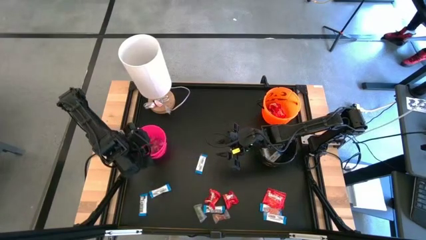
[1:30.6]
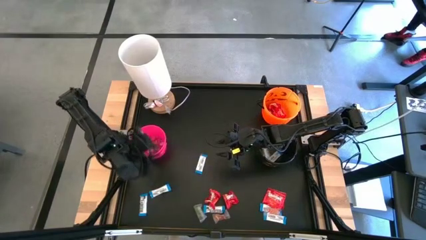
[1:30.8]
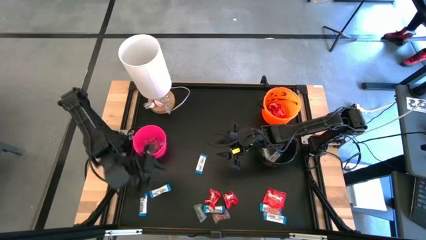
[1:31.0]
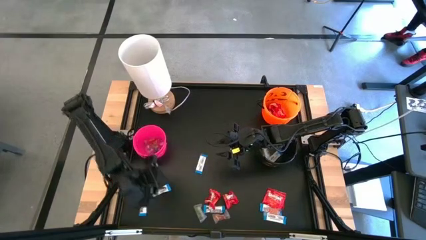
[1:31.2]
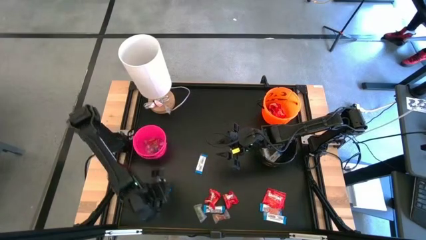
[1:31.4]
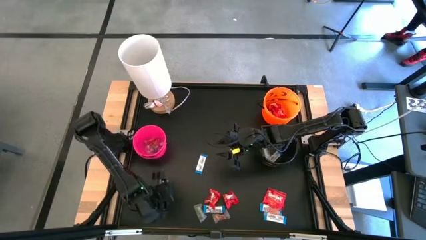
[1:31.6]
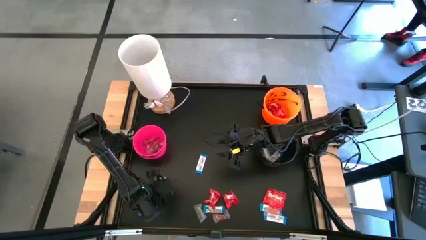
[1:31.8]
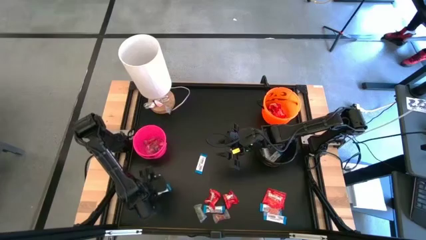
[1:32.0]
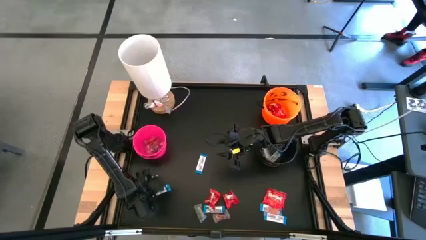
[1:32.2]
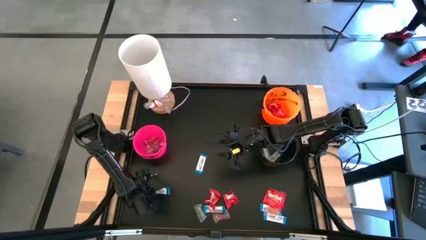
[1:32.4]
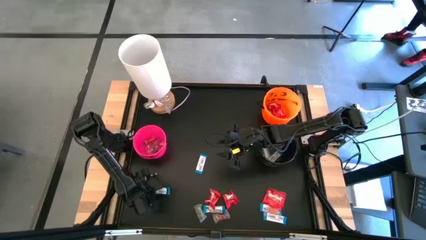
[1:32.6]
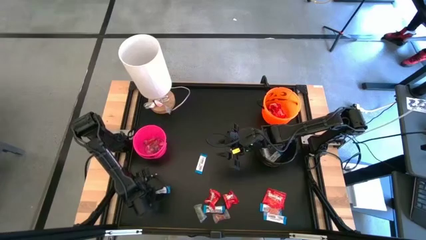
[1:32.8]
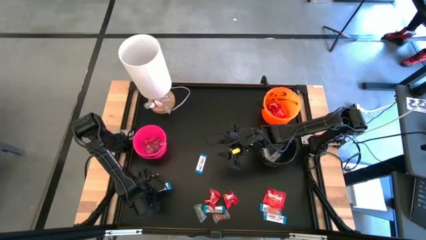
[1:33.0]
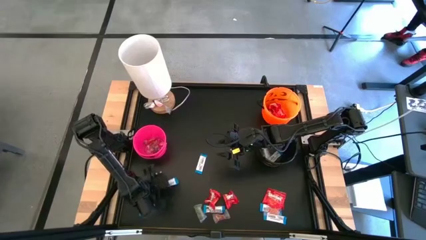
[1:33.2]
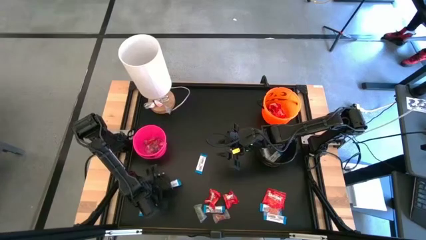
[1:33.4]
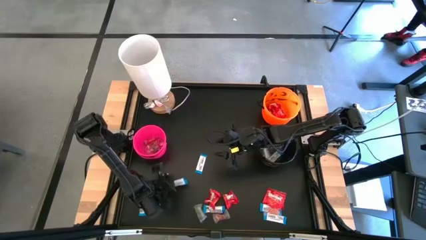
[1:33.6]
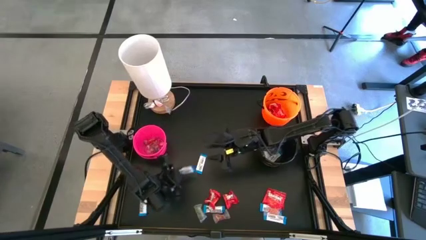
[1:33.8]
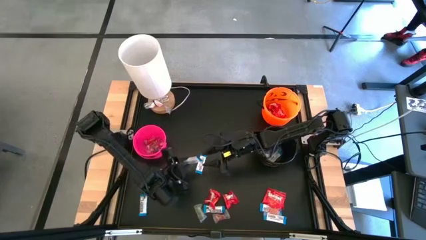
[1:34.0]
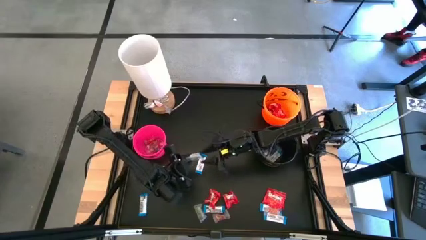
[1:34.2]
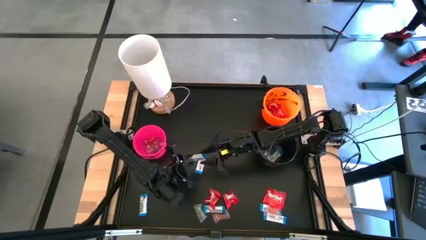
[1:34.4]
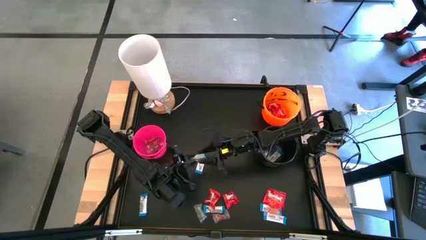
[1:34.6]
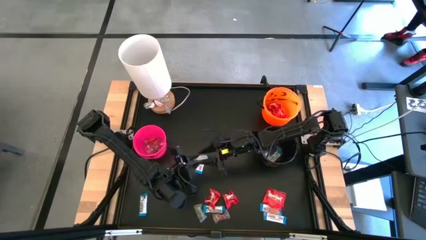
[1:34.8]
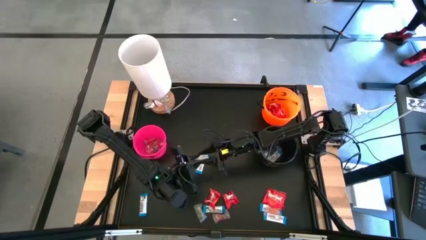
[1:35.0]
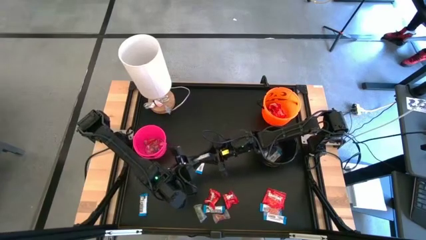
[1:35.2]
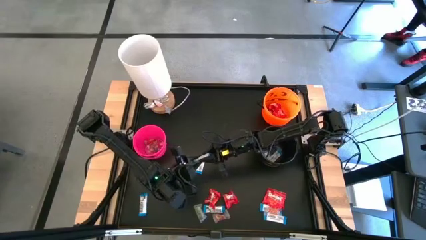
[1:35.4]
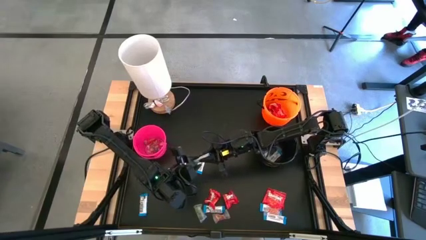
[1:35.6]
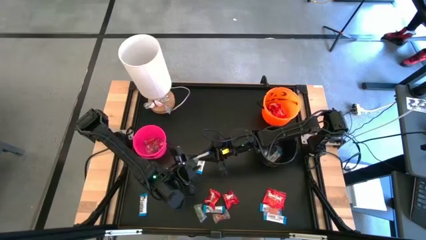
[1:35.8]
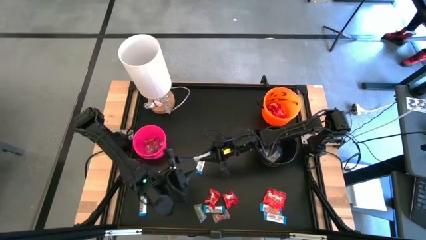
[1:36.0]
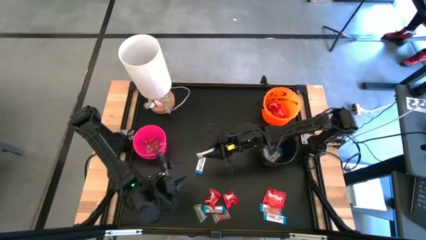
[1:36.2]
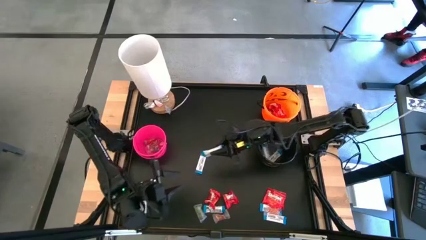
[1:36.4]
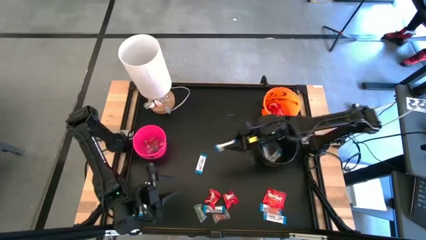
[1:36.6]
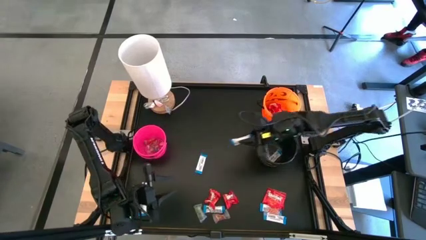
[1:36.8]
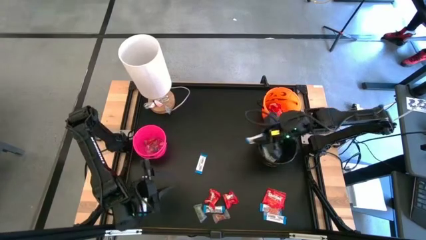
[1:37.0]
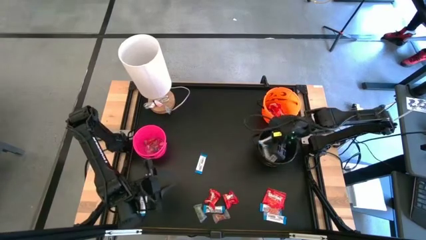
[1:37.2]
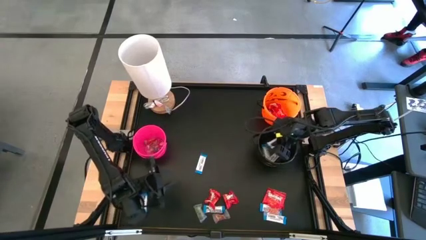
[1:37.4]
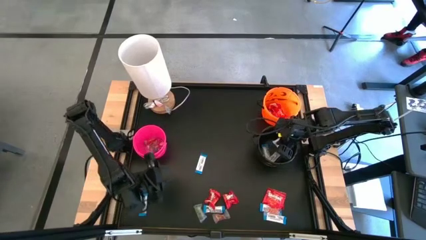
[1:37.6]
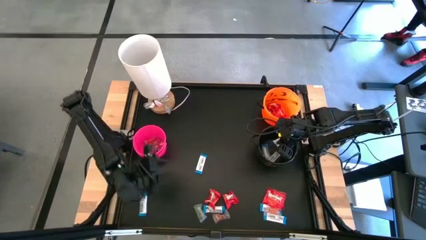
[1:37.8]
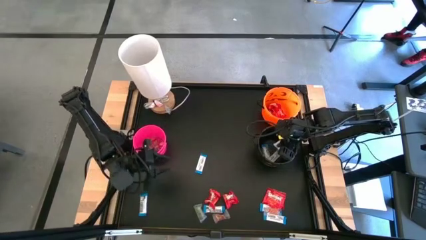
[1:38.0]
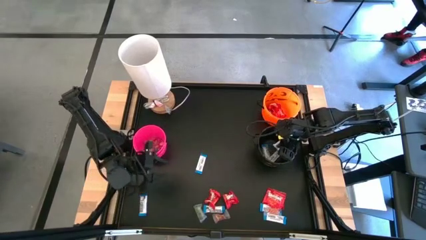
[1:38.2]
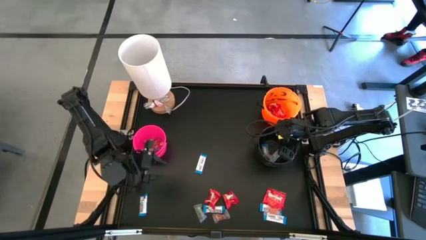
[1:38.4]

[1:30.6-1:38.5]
Task: Sort candy
Put the white chocolate into the black bucket

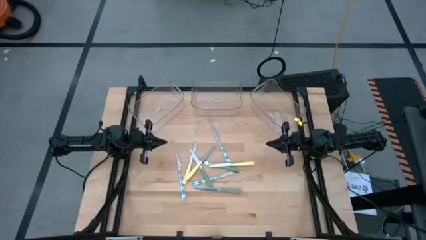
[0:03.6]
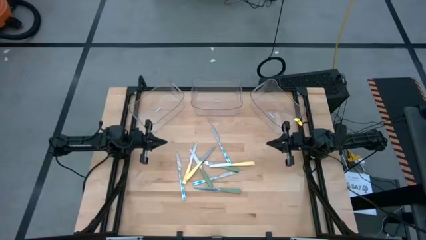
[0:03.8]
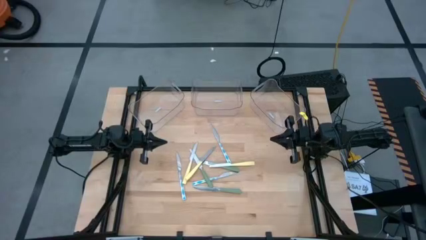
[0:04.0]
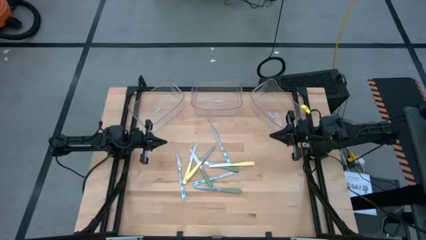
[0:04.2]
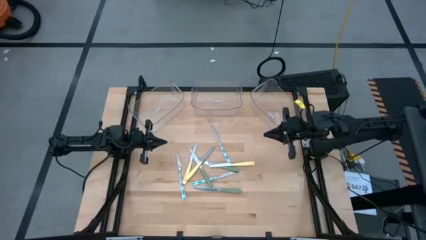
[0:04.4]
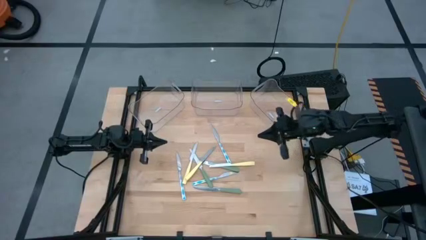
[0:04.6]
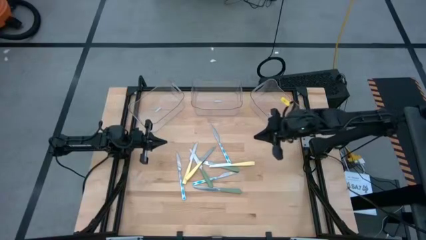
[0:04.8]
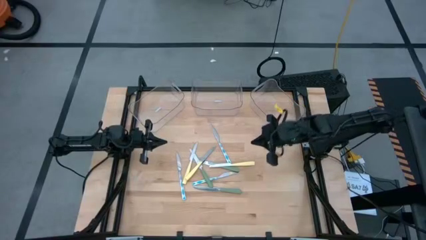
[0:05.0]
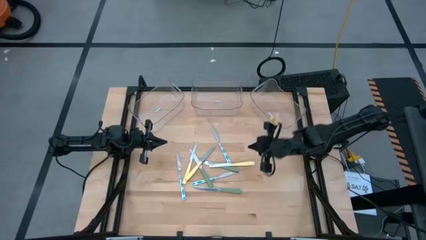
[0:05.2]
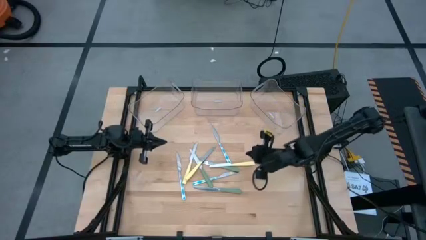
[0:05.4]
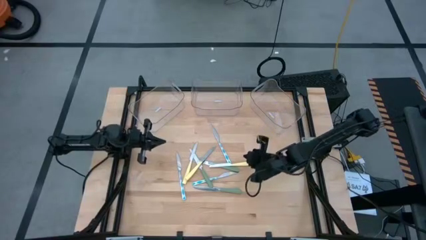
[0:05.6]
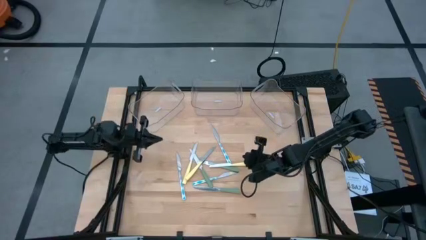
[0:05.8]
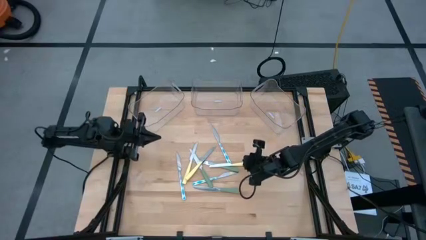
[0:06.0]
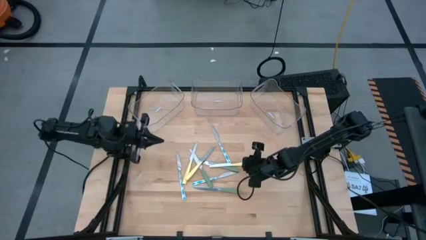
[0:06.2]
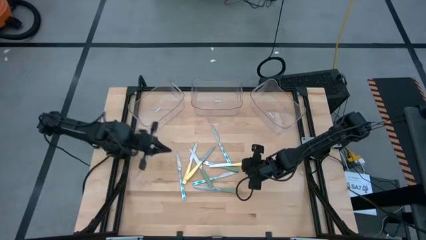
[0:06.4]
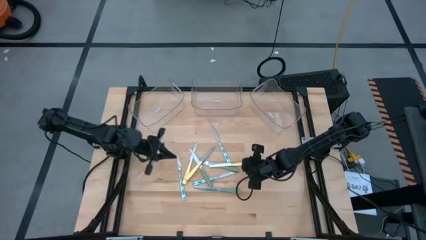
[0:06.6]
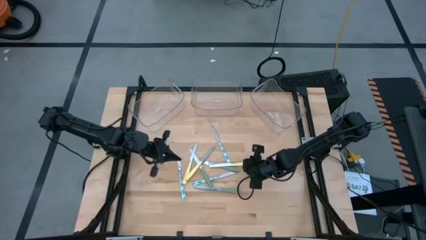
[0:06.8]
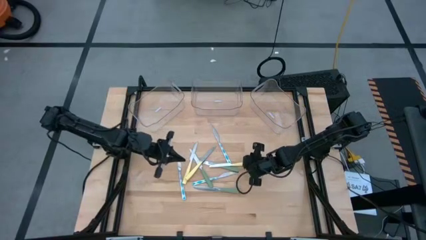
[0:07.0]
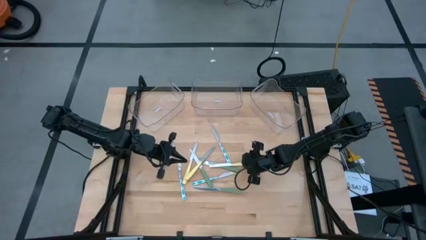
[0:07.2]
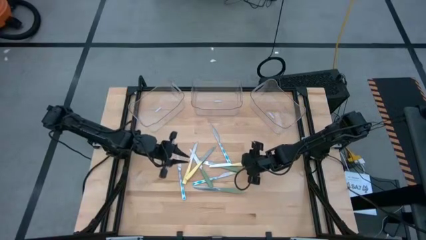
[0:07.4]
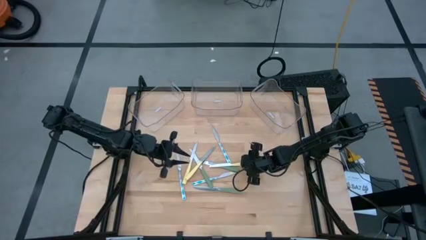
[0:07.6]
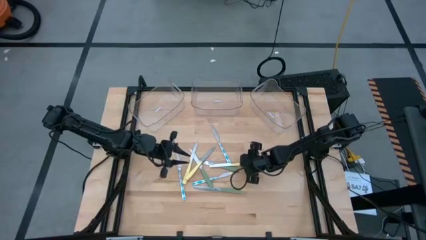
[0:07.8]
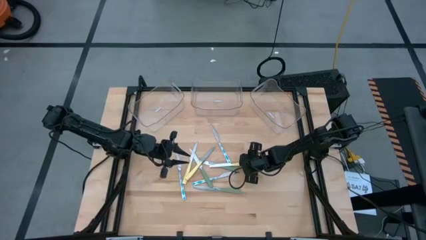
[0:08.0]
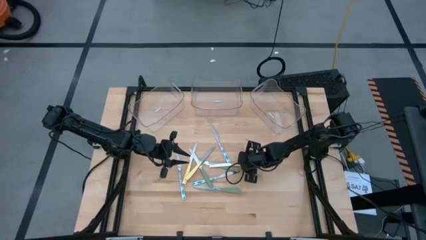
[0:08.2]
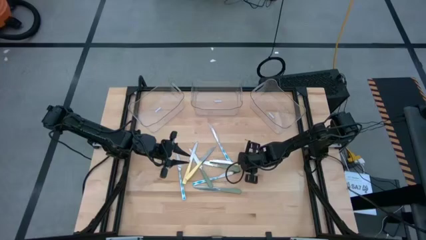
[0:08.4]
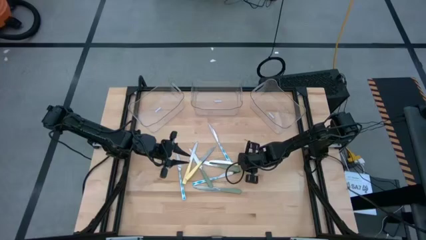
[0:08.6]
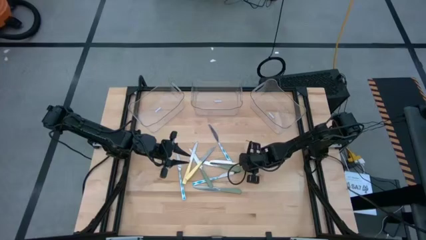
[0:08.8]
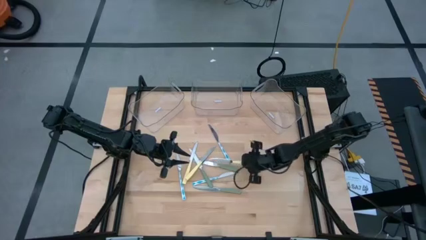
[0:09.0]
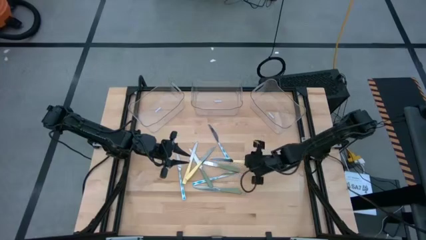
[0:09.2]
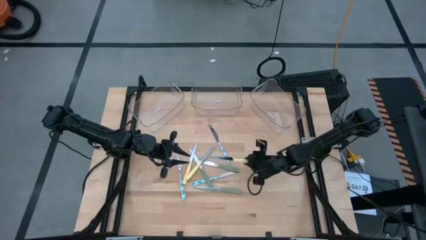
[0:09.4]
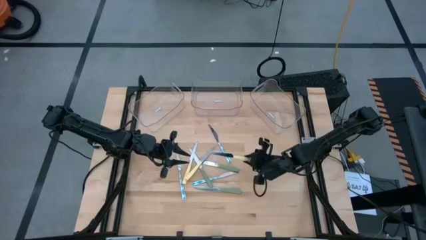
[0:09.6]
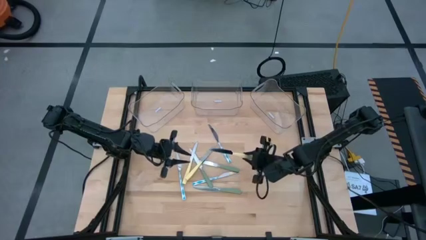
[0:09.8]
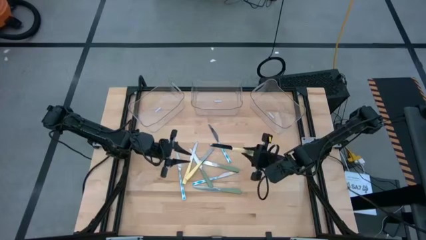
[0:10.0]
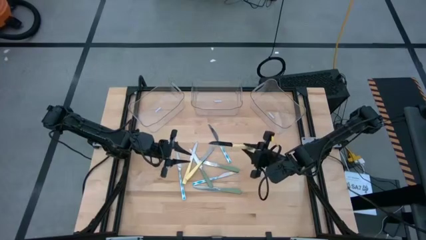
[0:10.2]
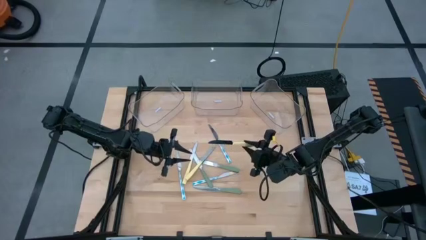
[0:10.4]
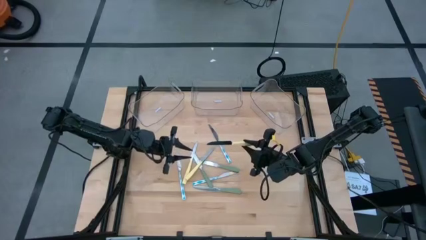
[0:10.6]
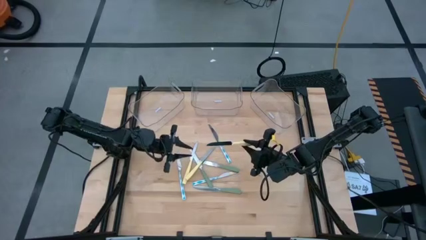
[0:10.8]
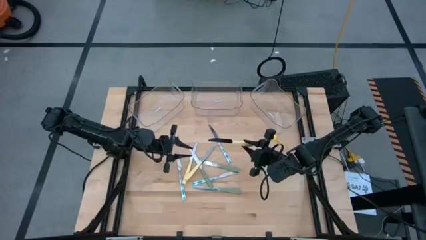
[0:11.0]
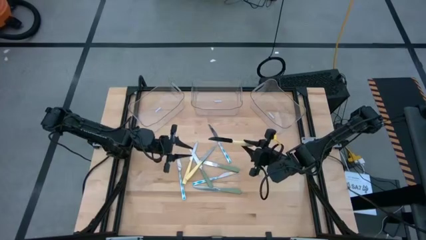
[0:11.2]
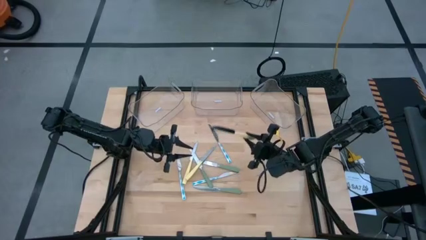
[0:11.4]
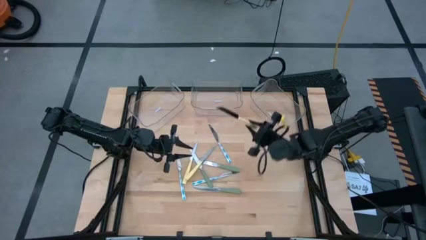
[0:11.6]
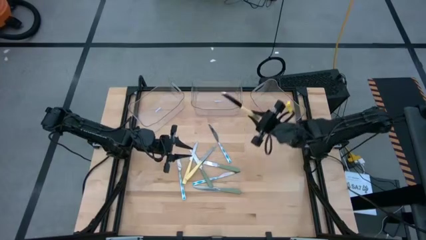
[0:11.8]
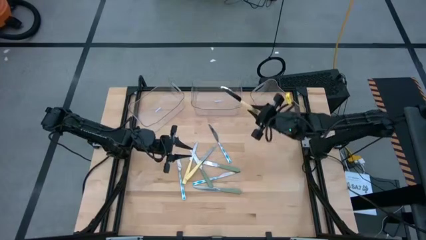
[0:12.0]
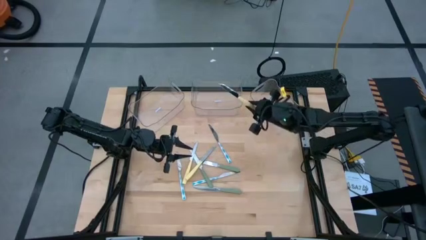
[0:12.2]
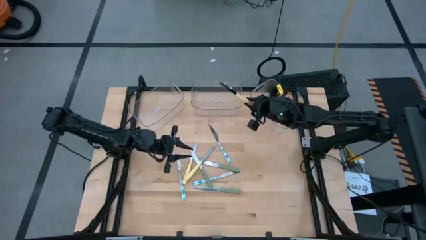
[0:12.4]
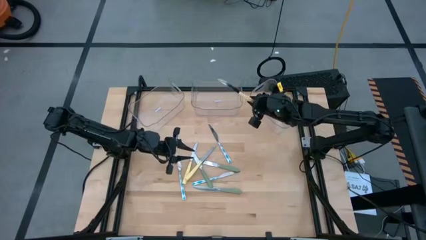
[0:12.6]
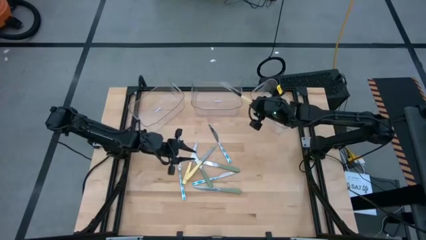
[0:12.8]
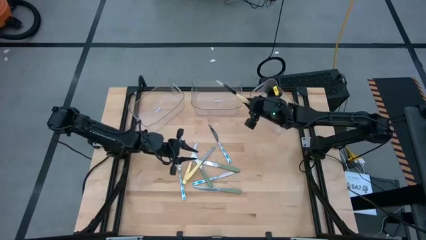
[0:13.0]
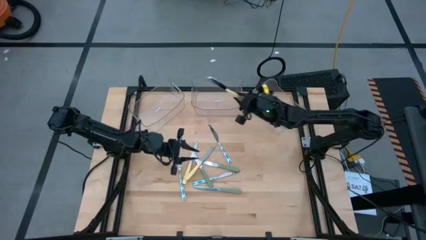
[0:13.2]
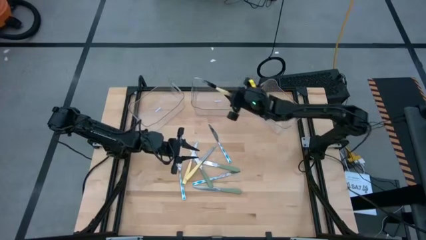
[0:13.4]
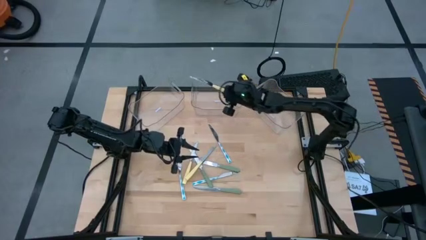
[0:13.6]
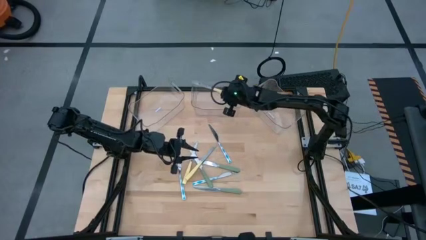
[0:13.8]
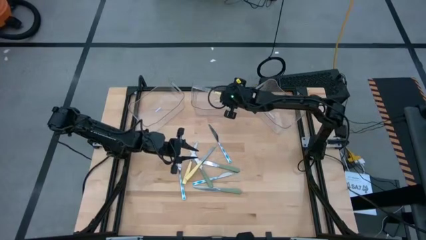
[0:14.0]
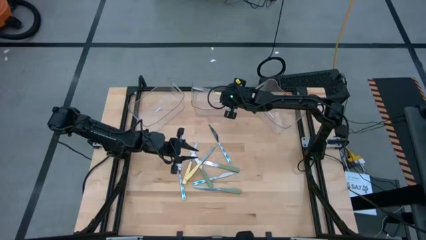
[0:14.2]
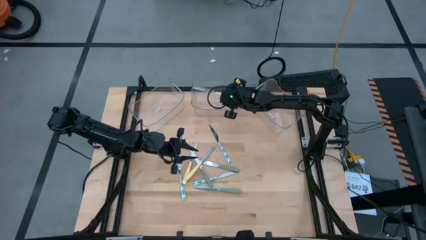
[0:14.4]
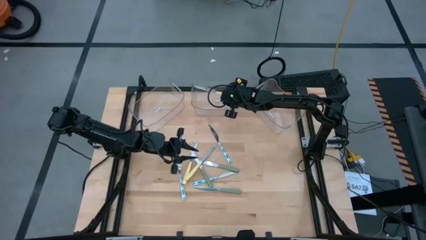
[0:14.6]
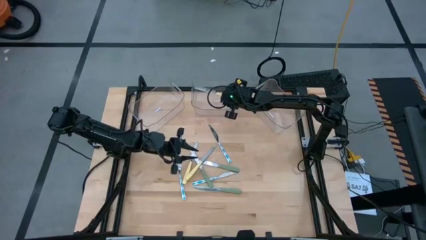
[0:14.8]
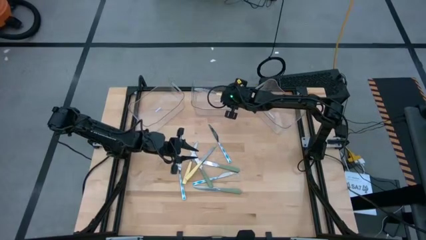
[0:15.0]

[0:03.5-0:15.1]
Task: Sort silverware by color (type)
Put the right yellow table knife into the center transparent bin
